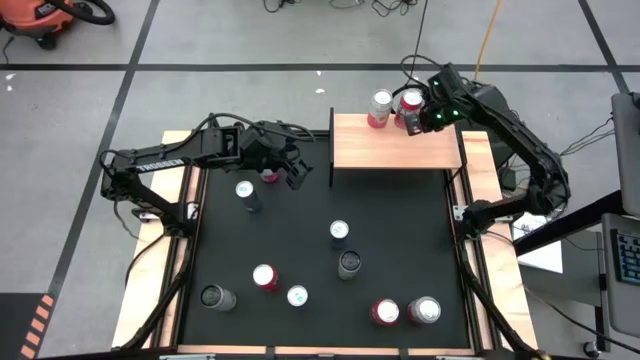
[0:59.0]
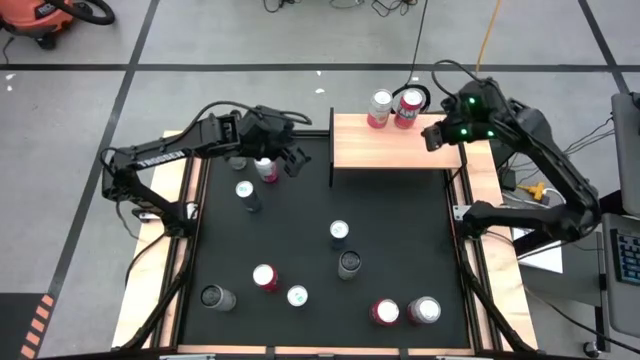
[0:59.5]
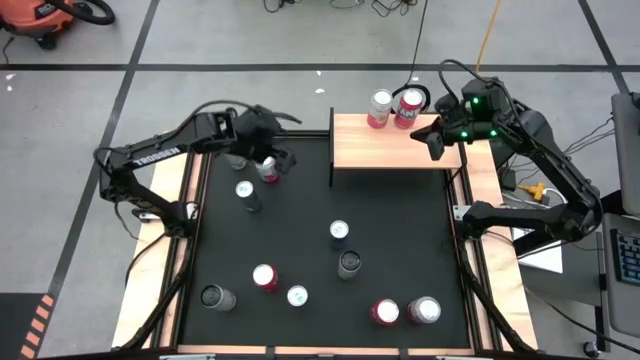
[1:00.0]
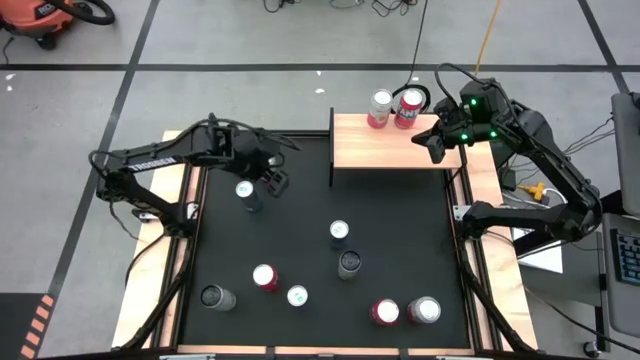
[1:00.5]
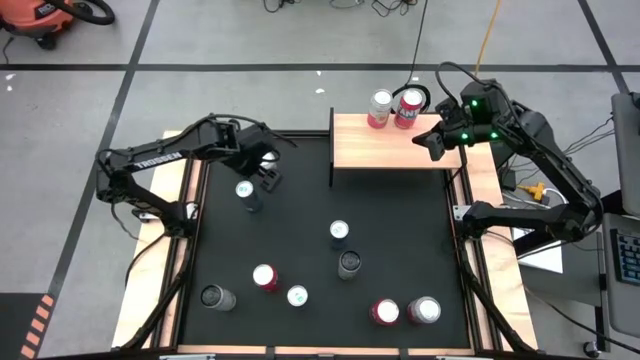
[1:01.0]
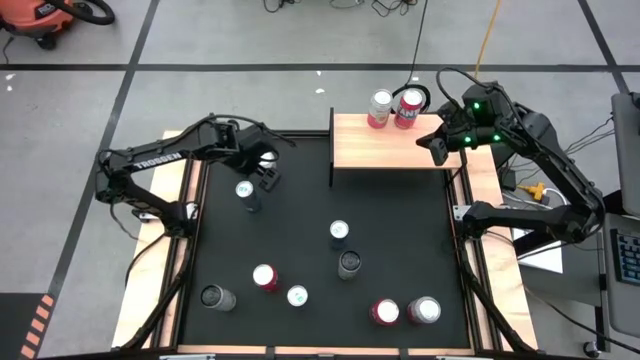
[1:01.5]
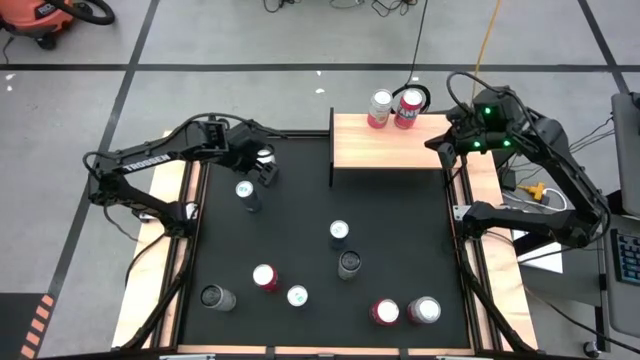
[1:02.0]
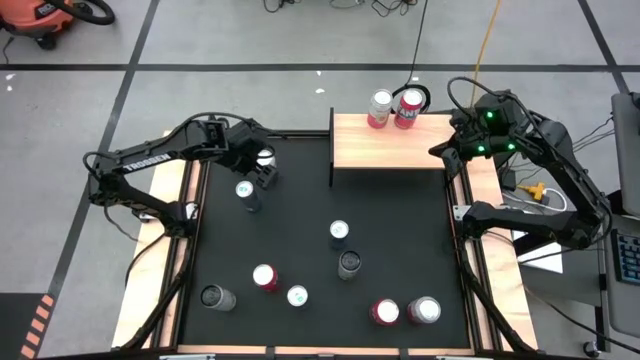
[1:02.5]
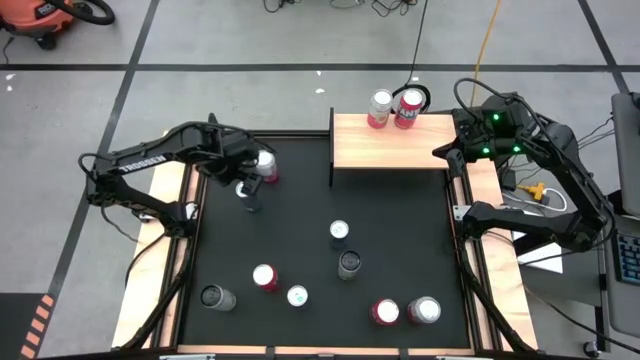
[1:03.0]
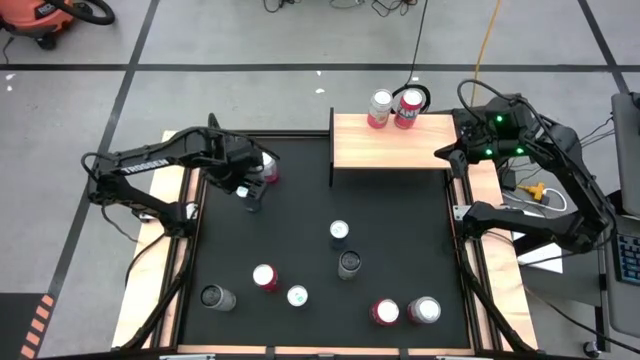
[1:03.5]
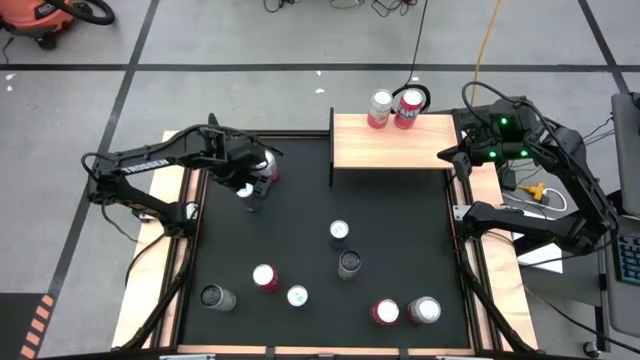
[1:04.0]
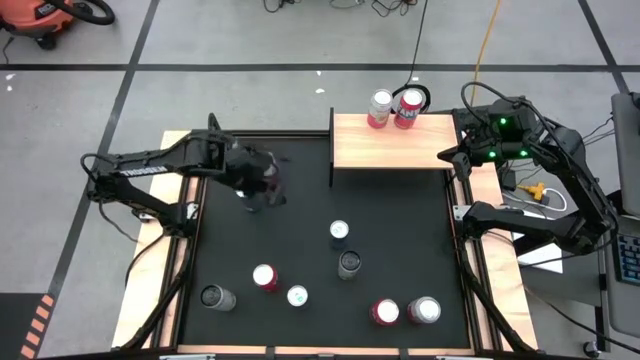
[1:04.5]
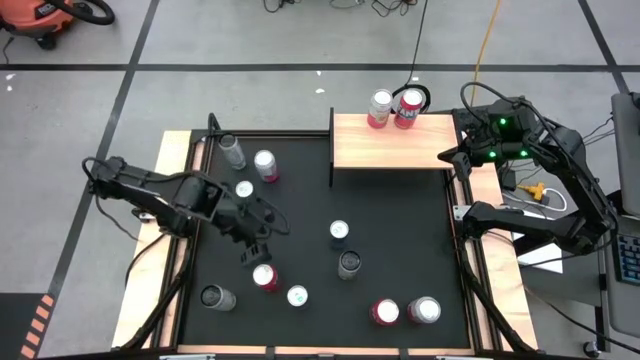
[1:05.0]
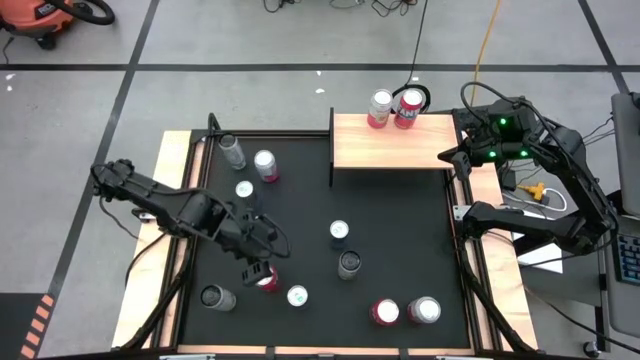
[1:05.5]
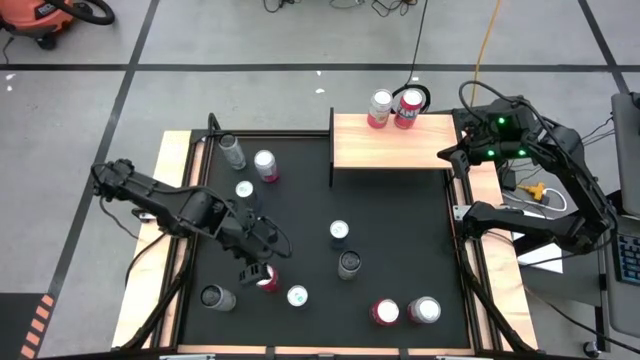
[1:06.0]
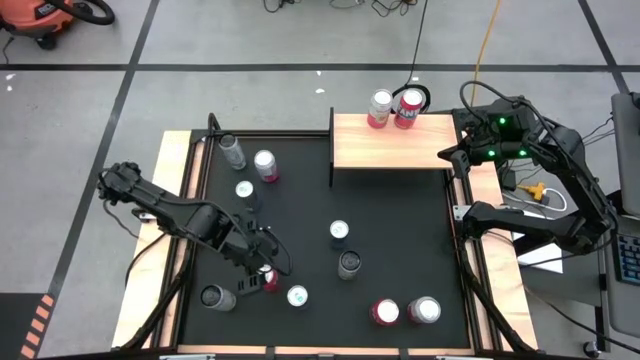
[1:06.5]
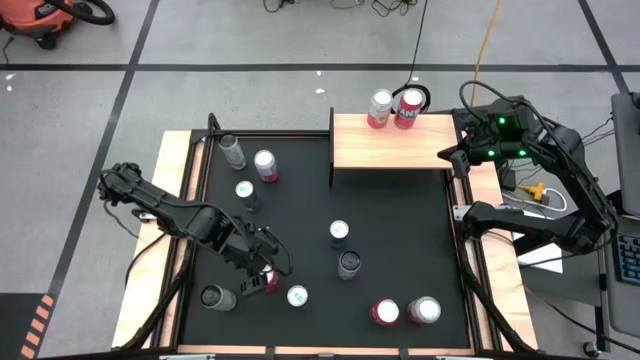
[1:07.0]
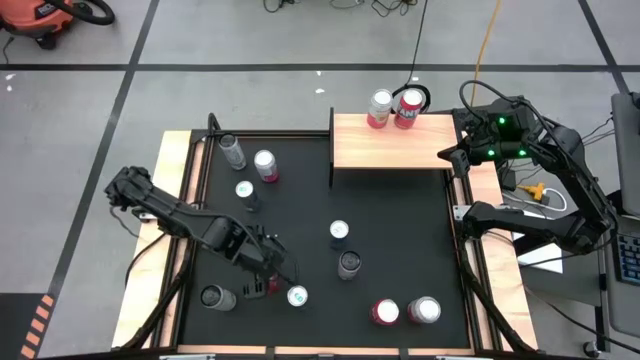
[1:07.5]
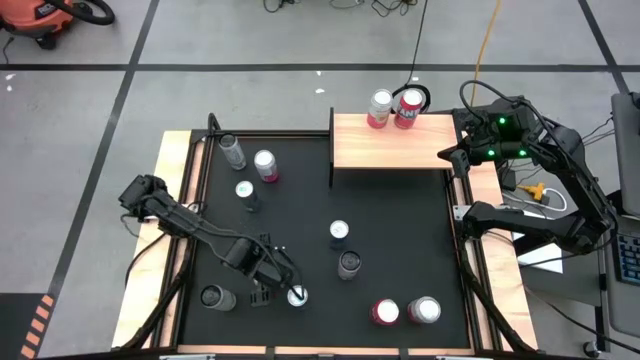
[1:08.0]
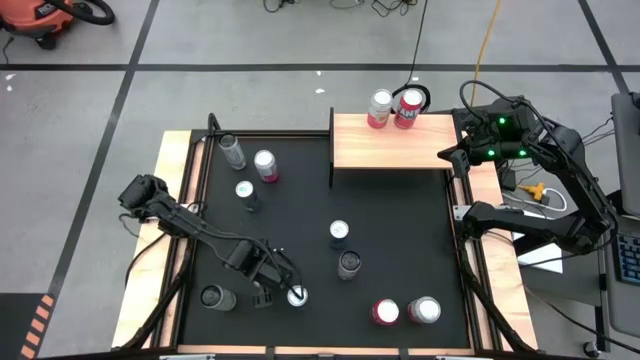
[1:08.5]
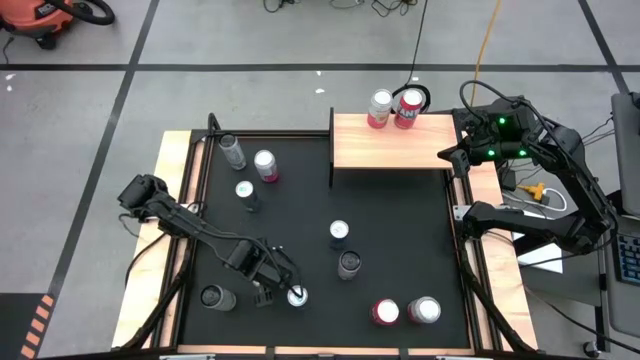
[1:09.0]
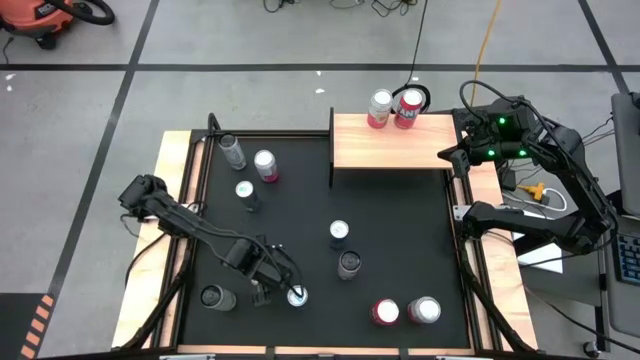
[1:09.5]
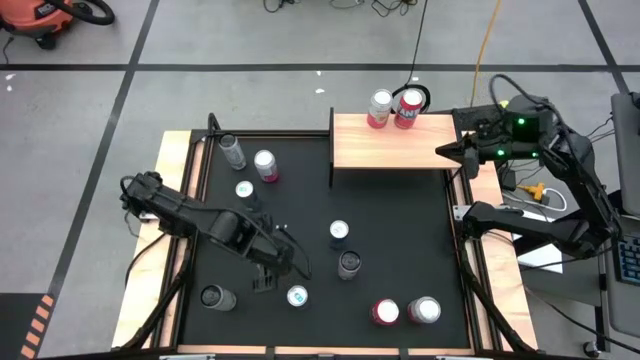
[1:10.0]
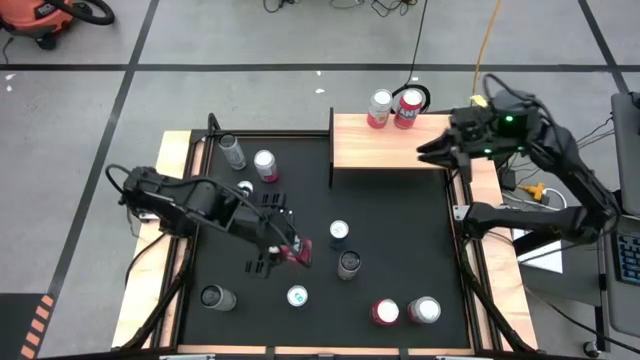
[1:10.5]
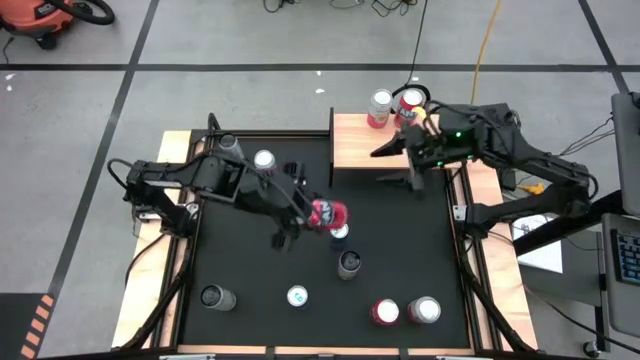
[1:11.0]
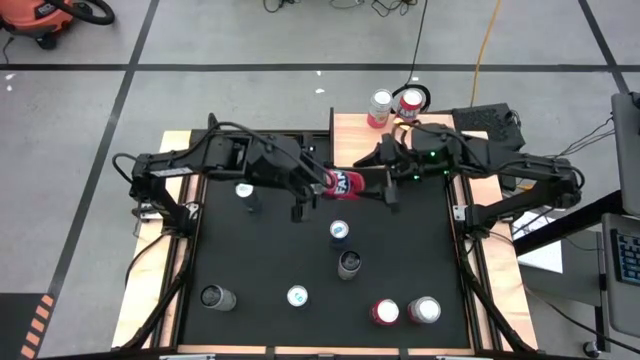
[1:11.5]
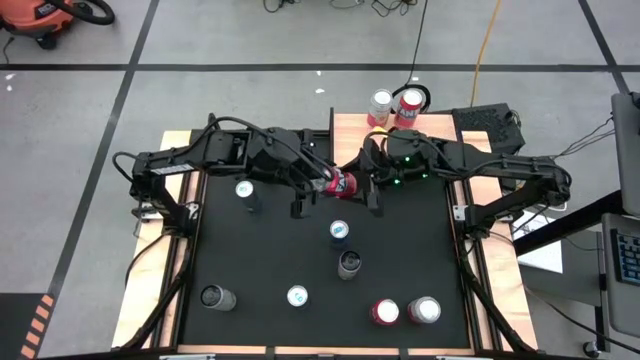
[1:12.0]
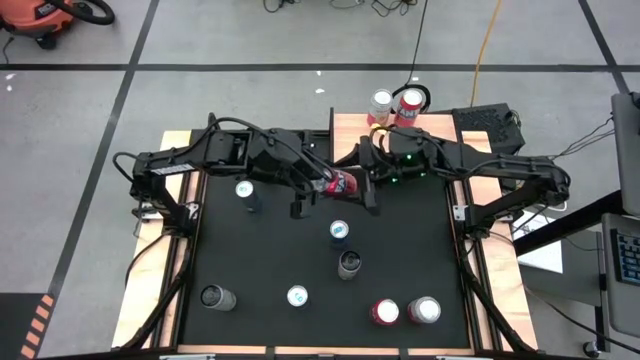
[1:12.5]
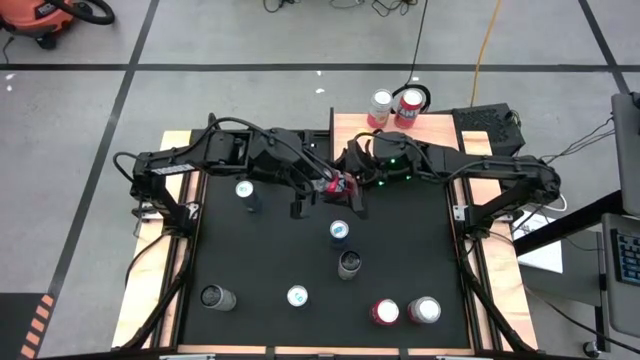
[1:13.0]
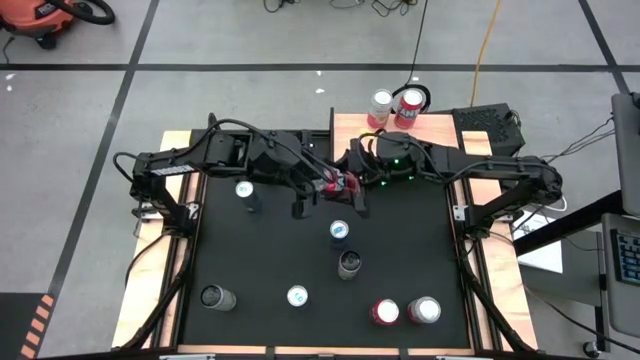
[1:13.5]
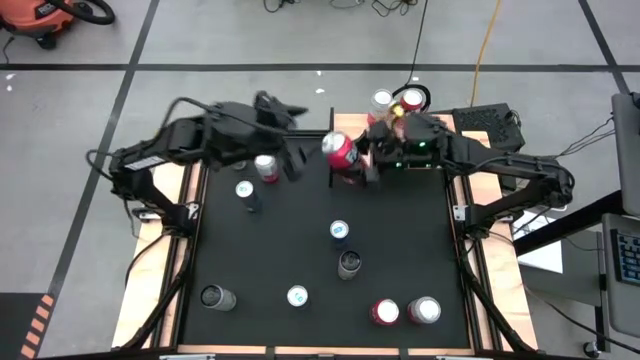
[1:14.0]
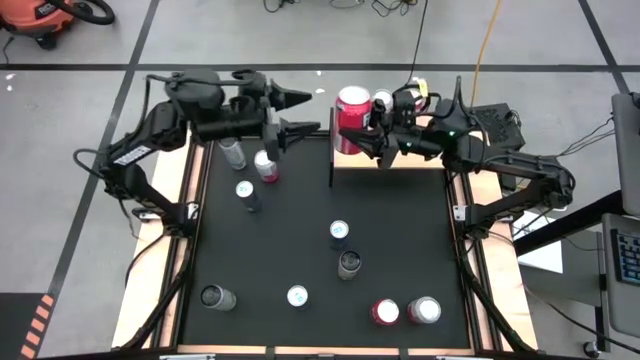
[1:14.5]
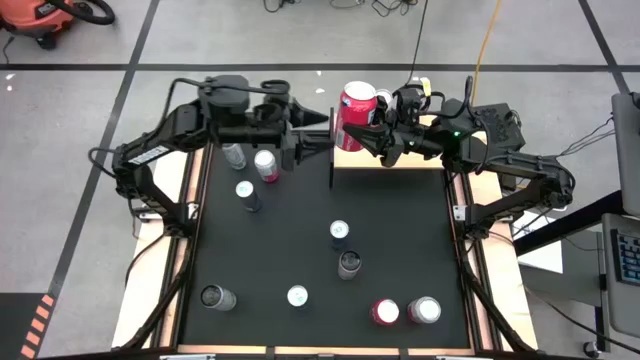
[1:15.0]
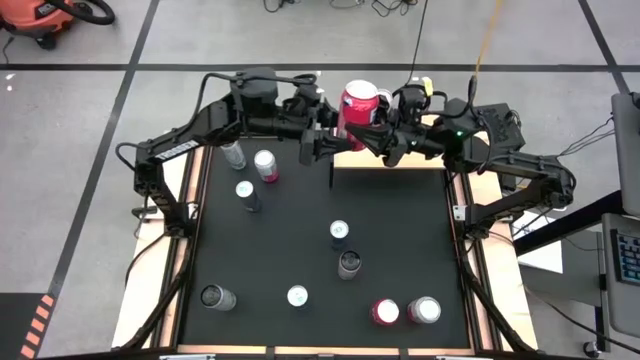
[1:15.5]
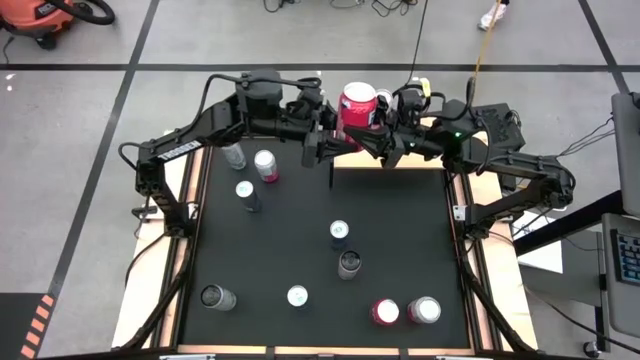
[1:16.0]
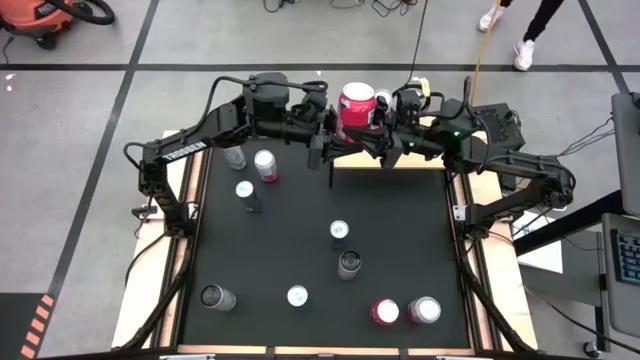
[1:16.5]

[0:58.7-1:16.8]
Task: Place canned beverage on shelf
Put the top red soda can on the shelf aligned with the other red soda can

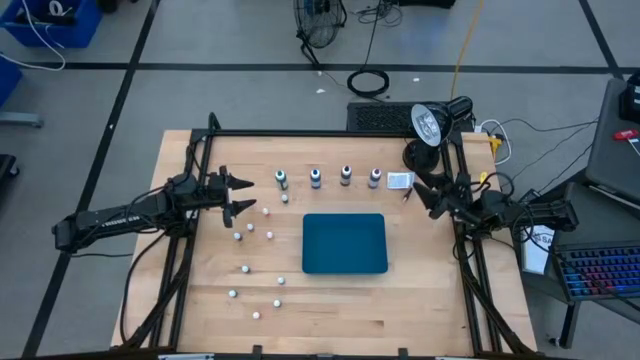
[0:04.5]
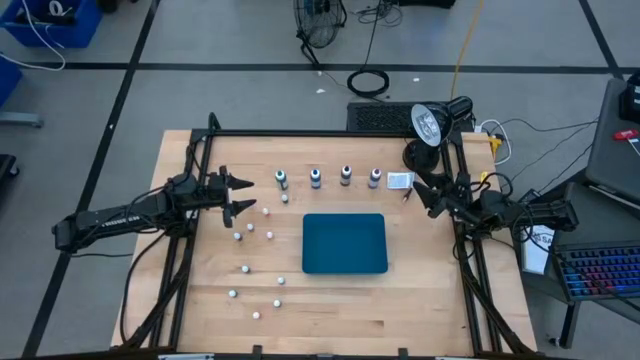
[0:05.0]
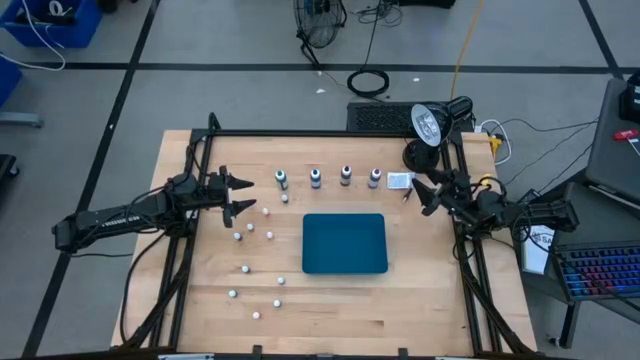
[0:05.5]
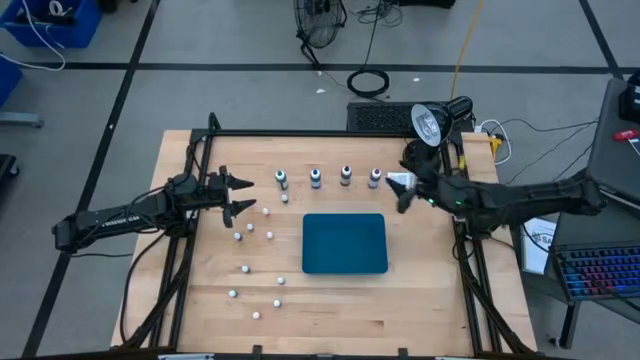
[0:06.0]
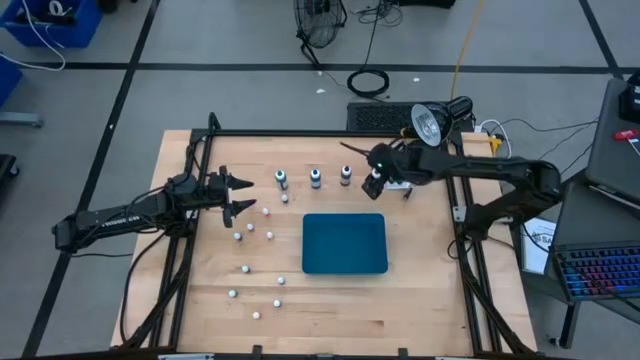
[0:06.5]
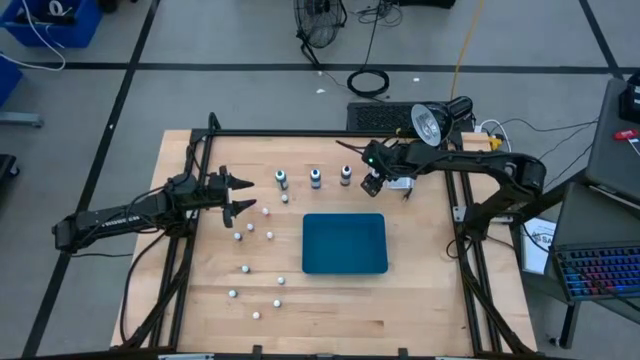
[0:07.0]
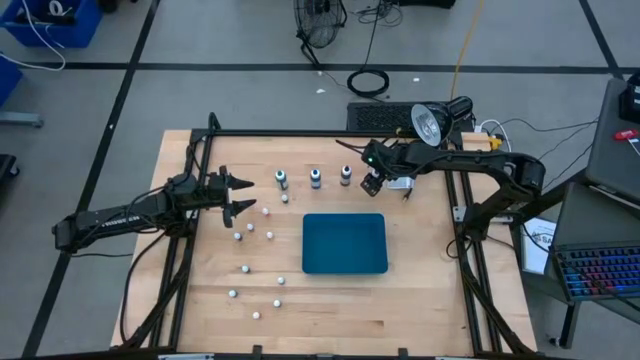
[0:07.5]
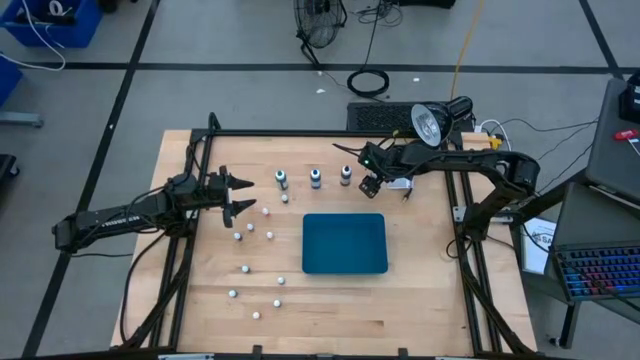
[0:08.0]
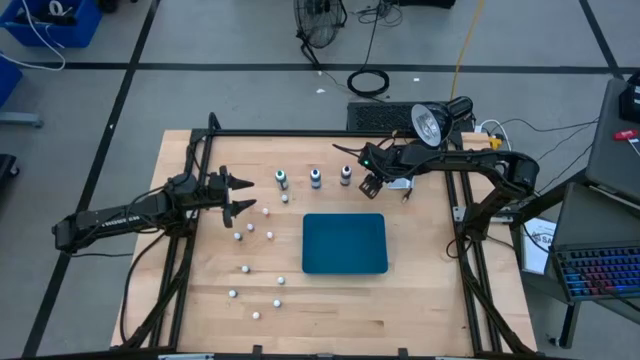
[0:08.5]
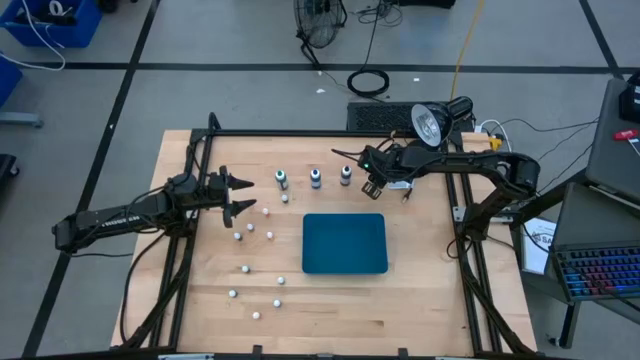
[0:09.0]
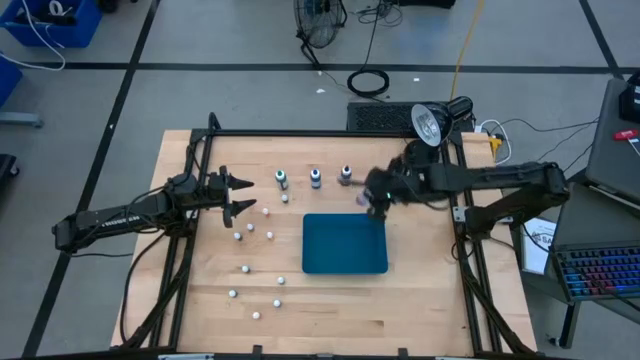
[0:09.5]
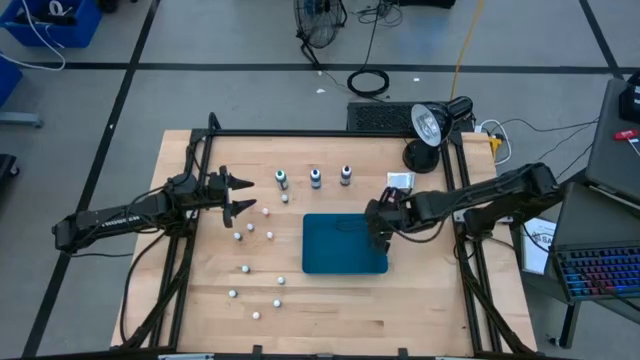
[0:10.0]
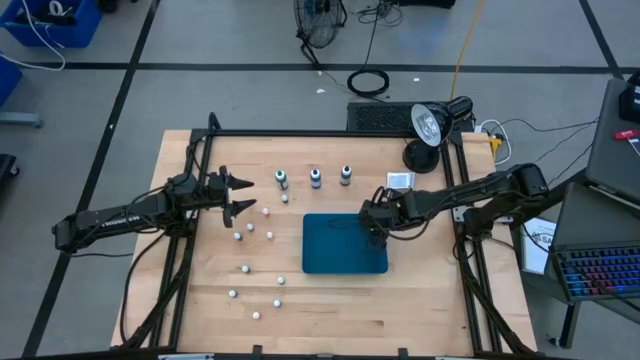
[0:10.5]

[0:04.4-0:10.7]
Task: Pick & Place food coloring
Put the large purple food coloring bottle into the blue bin
